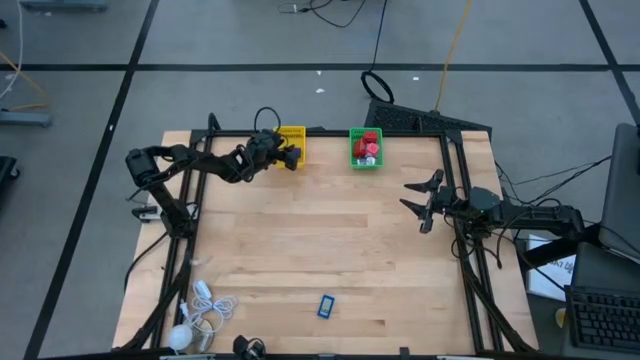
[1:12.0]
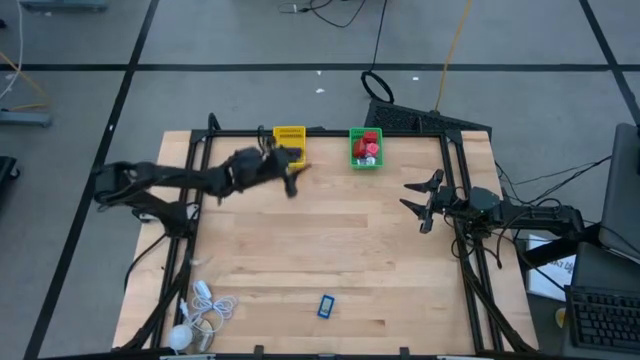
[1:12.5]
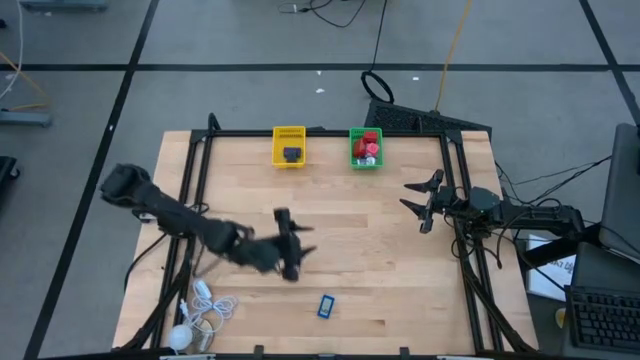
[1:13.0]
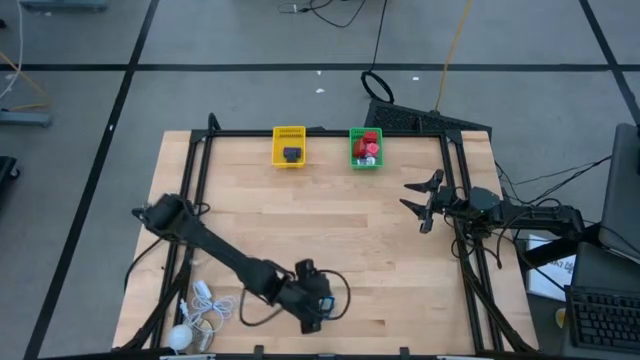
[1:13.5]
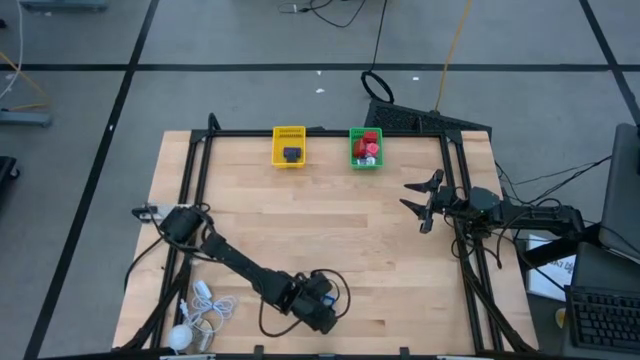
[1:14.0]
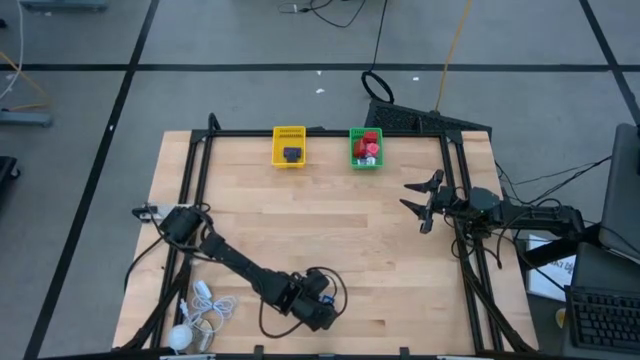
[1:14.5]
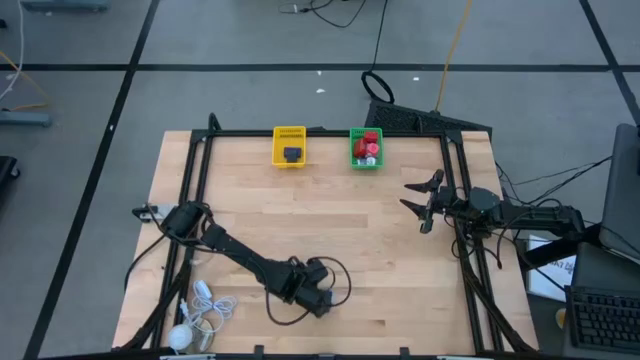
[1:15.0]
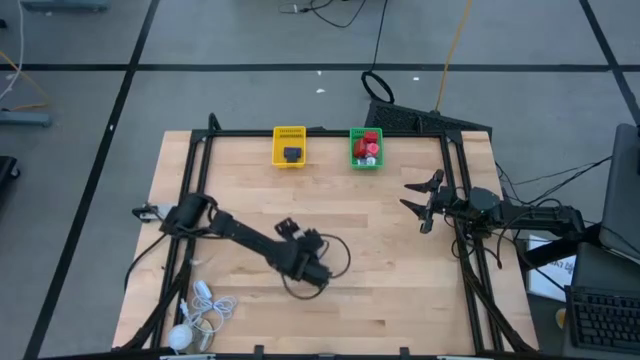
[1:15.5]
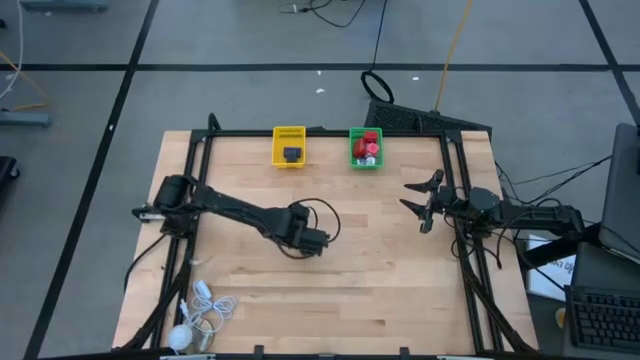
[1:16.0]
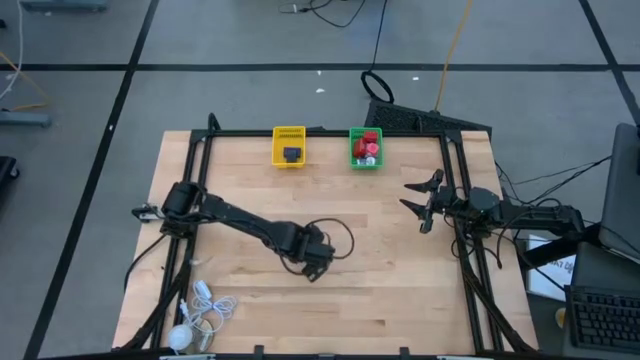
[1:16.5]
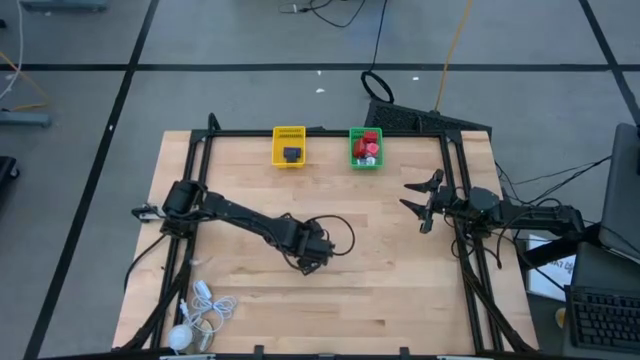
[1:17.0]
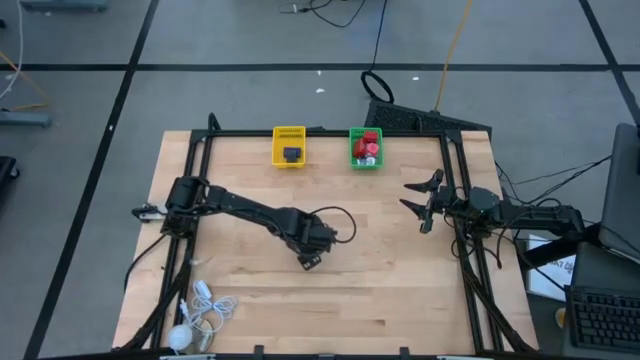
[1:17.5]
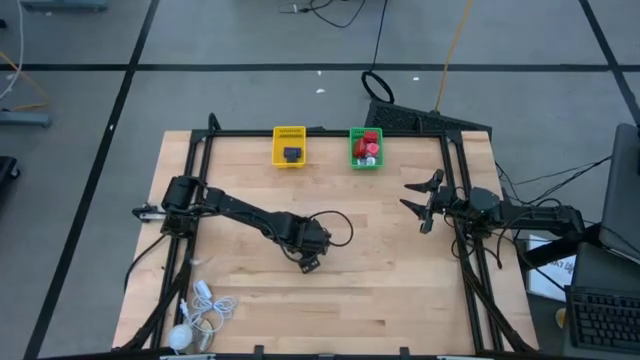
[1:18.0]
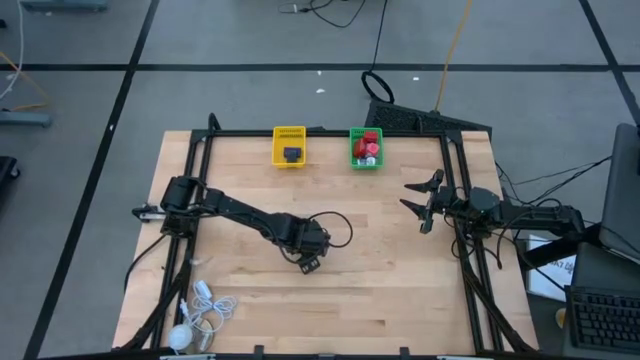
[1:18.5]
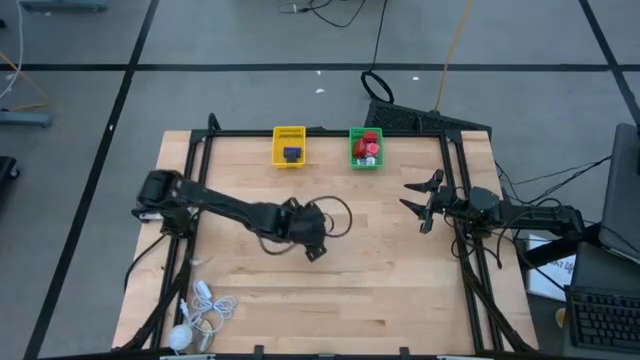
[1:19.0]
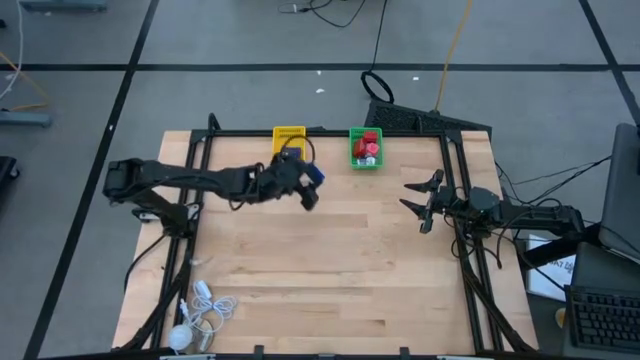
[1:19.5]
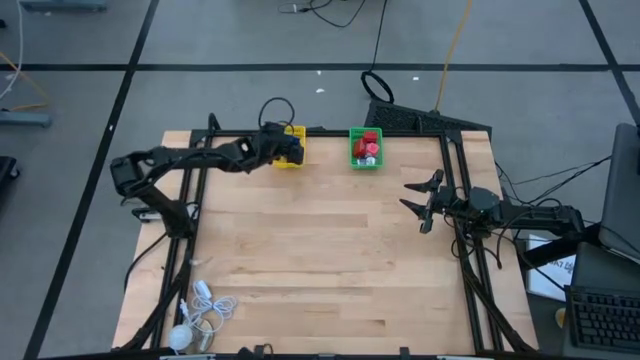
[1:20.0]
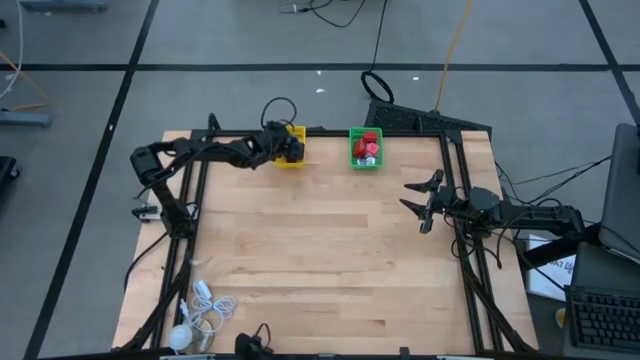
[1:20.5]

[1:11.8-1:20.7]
Task: Pick & Place Office items
Put the blue digital timer into the yellow bin

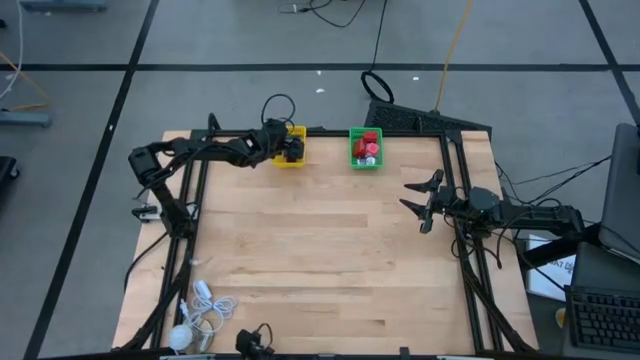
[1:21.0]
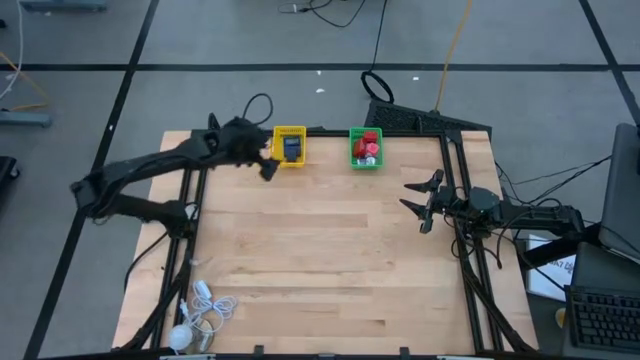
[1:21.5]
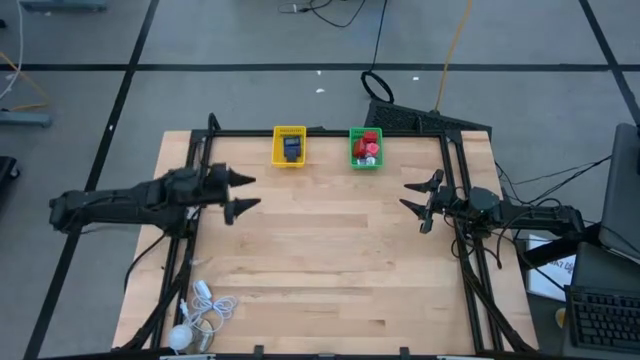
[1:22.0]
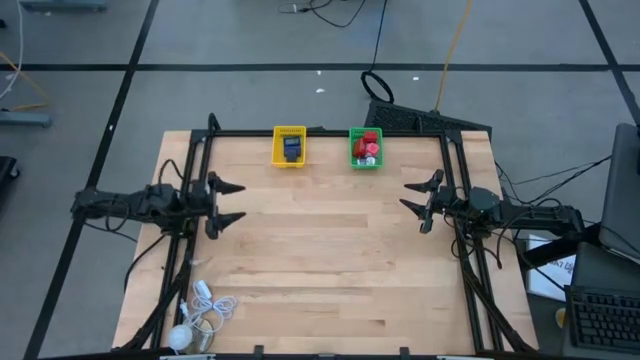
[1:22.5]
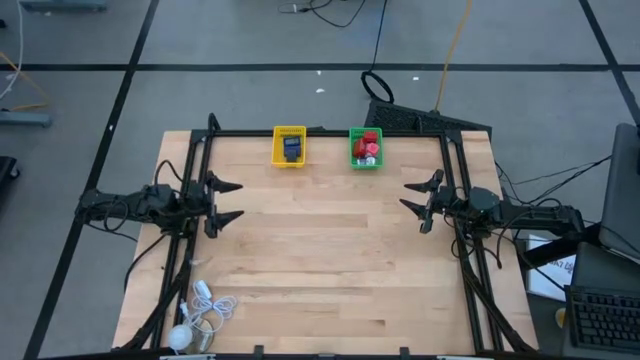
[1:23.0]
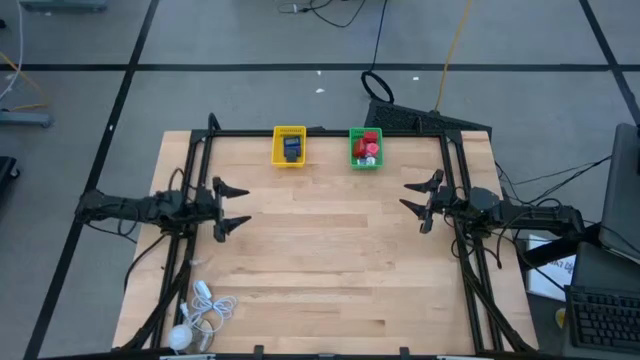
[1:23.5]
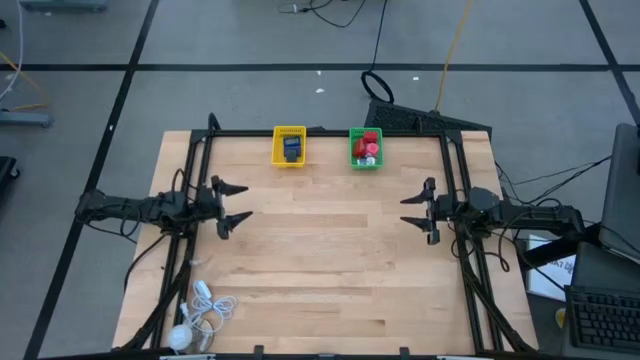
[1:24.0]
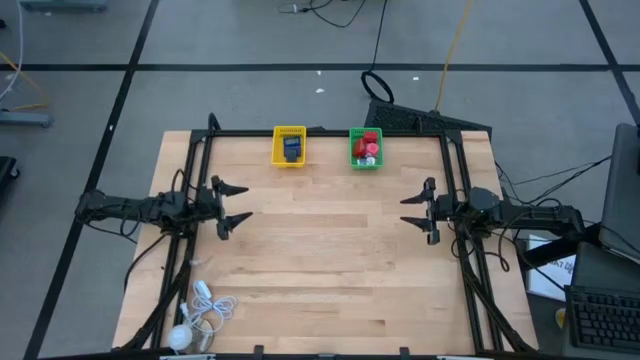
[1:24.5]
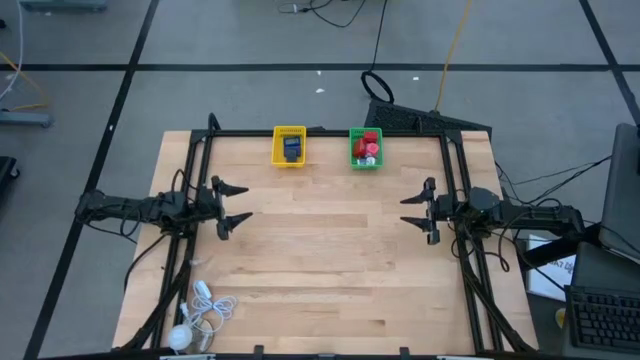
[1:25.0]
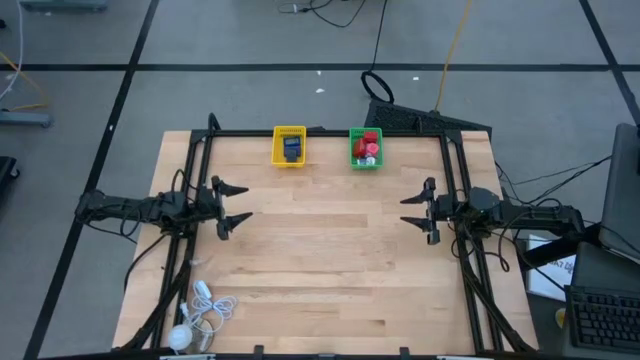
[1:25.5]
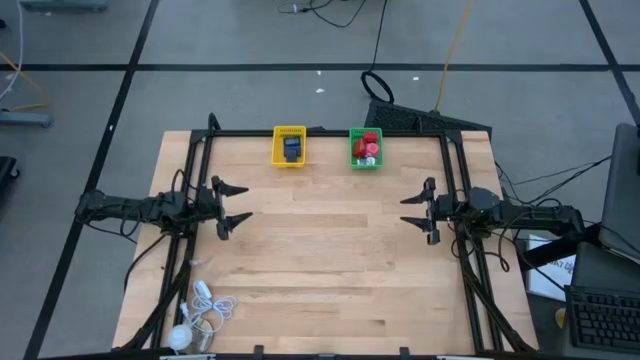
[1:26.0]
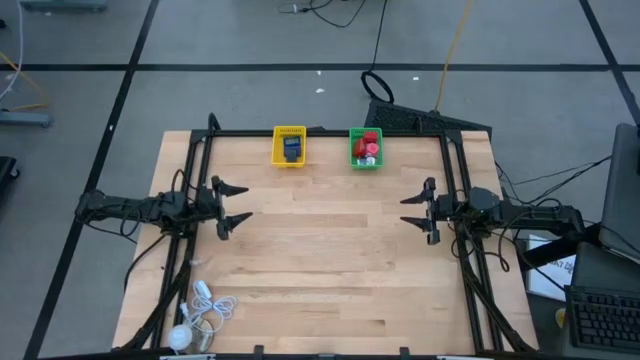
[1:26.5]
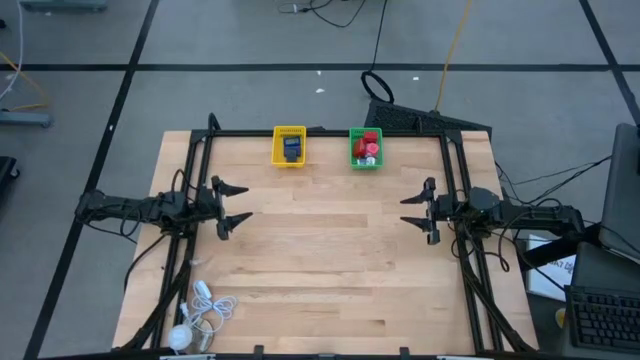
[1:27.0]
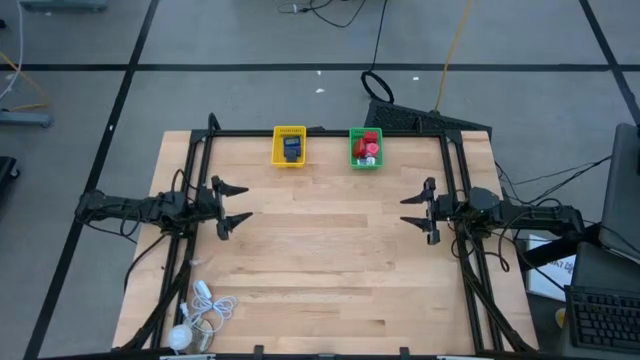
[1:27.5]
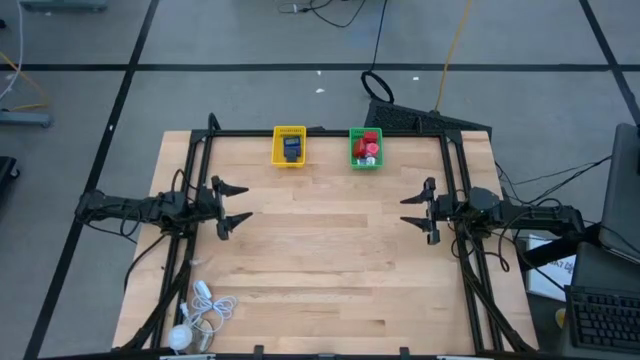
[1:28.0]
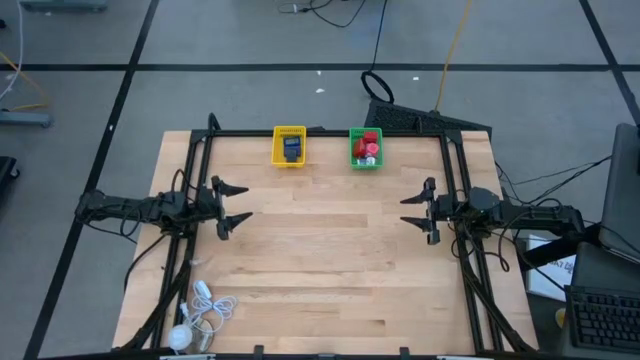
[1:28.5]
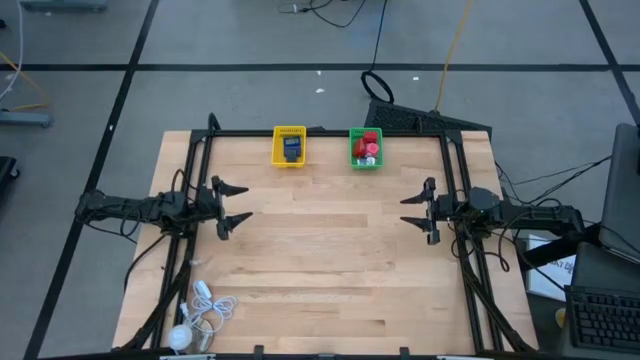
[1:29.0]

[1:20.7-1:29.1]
Return to Home Position

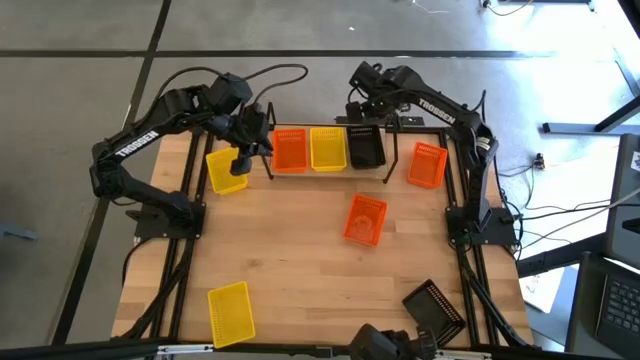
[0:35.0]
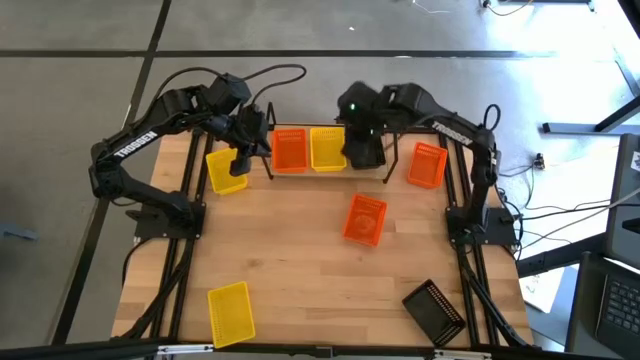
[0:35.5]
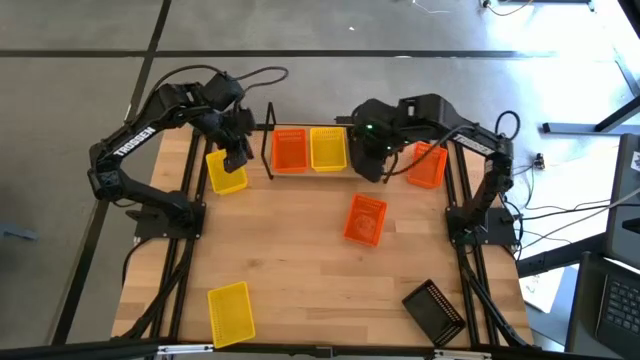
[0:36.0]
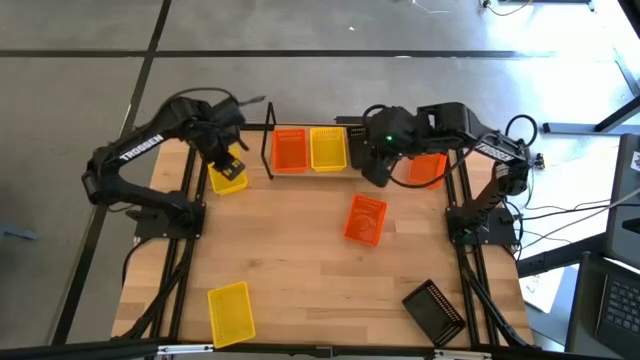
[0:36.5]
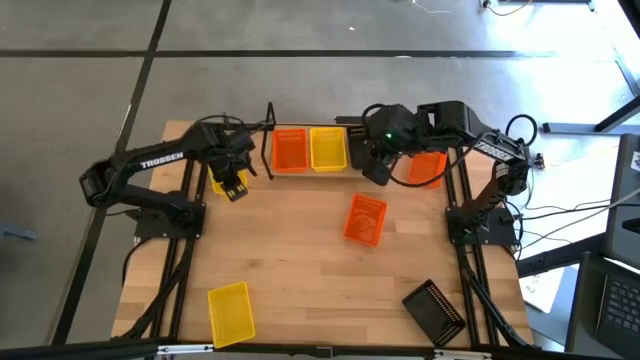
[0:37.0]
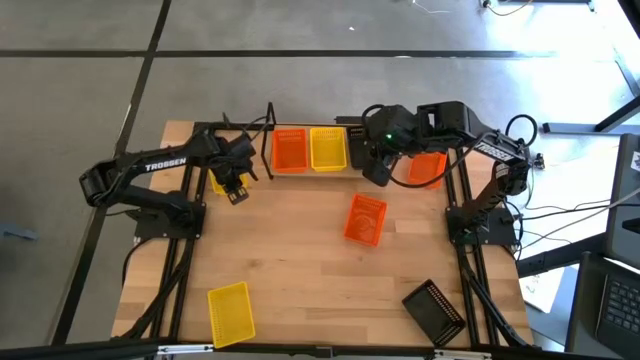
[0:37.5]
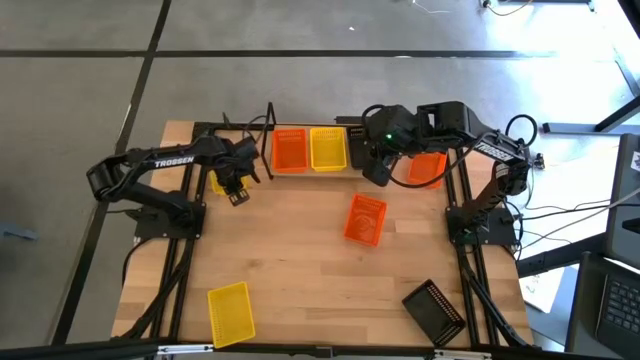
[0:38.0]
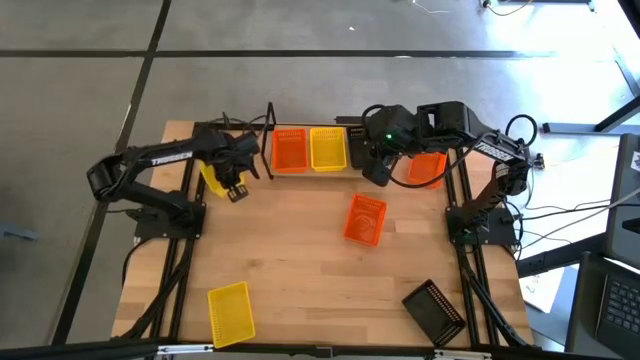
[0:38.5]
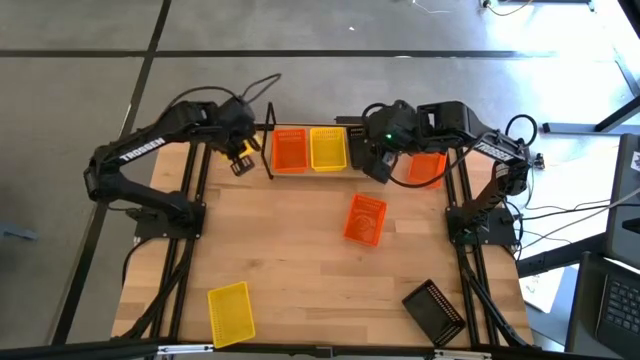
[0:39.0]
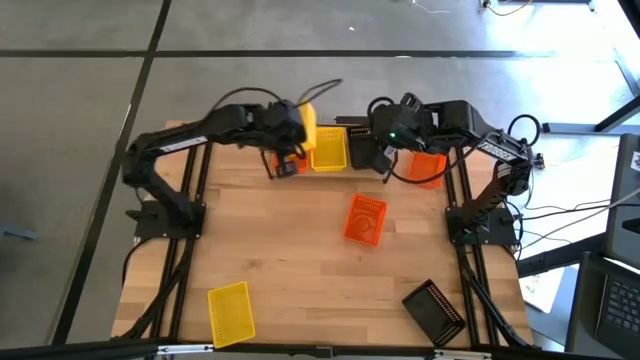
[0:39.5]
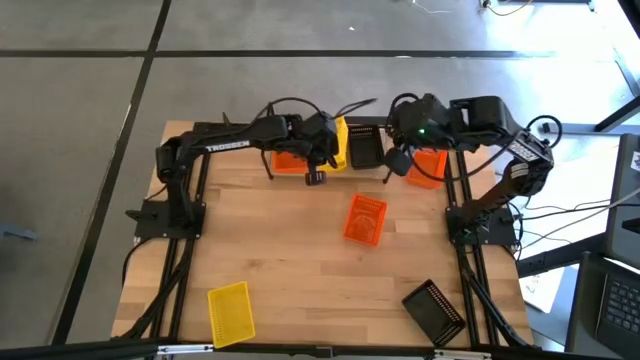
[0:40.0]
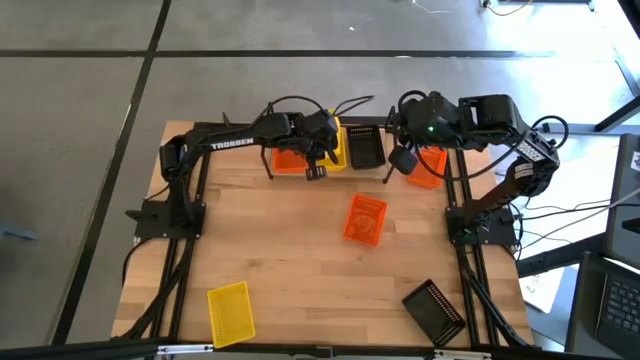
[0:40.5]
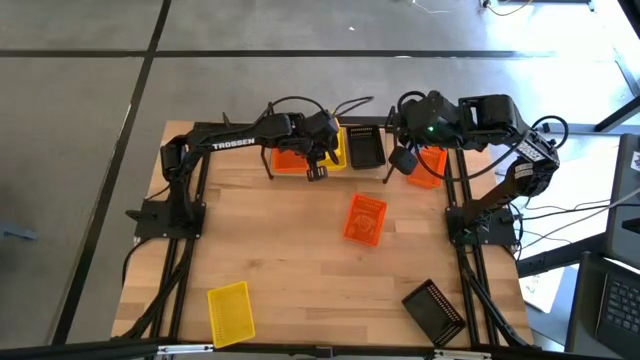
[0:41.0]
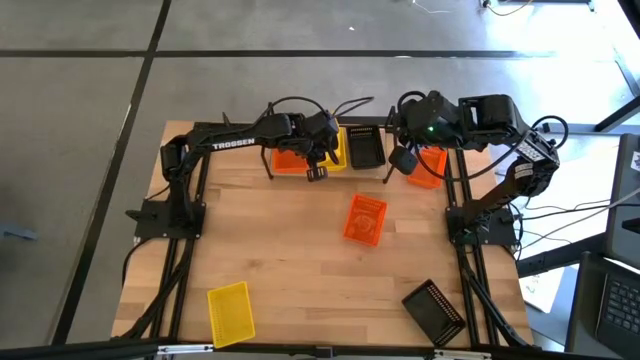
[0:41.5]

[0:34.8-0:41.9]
Task: Stack baskets on shelf by color
Stack the top yellow bin on the yellow bin on the shelf
